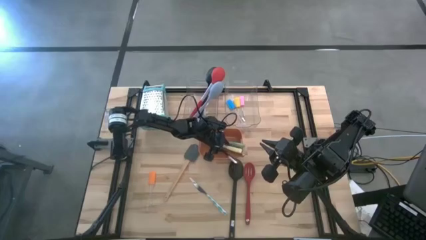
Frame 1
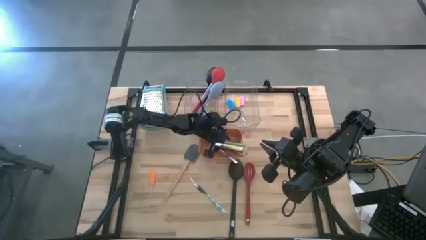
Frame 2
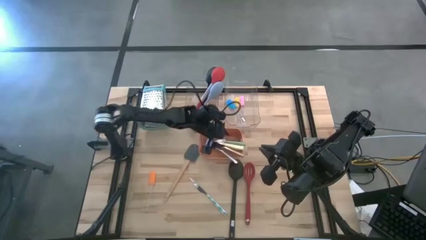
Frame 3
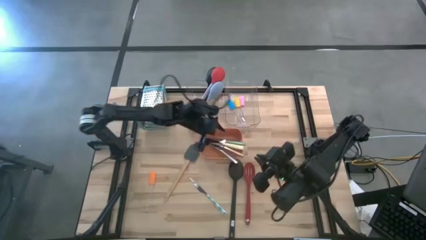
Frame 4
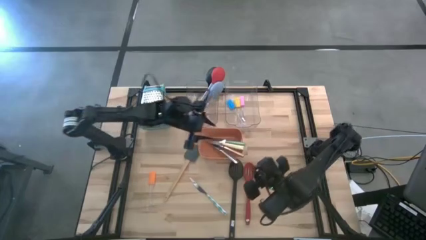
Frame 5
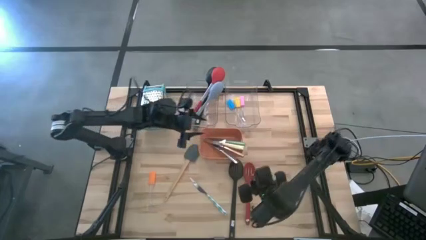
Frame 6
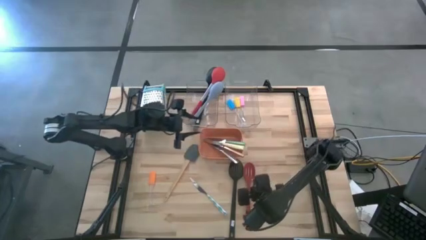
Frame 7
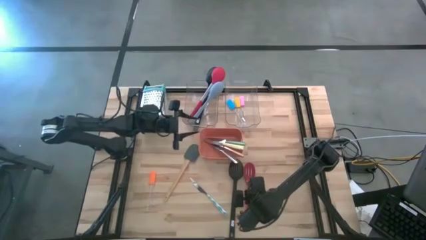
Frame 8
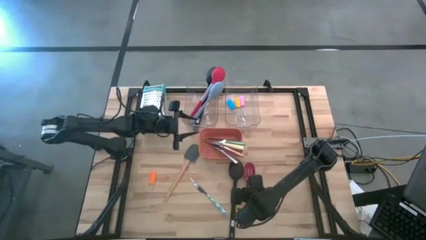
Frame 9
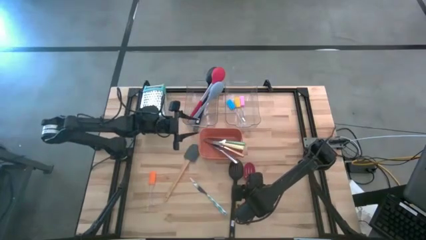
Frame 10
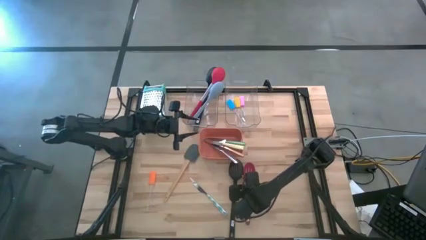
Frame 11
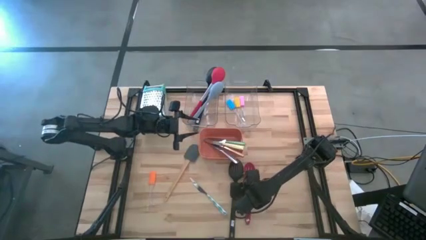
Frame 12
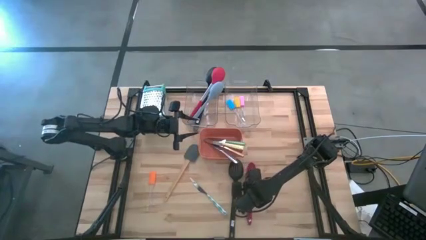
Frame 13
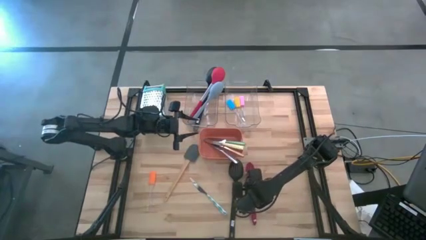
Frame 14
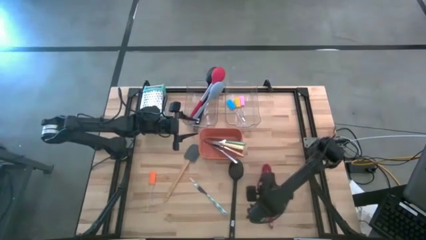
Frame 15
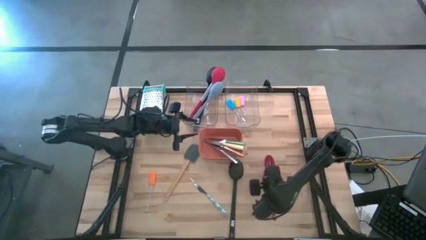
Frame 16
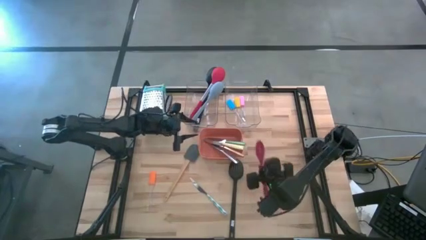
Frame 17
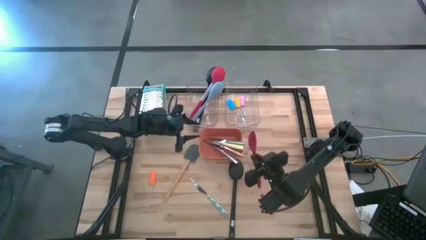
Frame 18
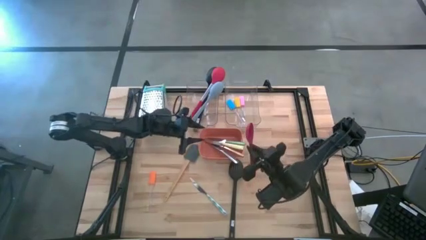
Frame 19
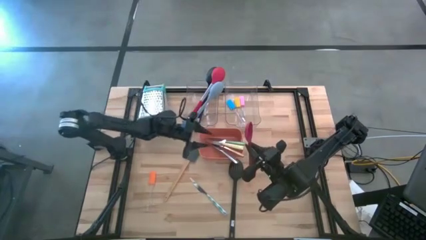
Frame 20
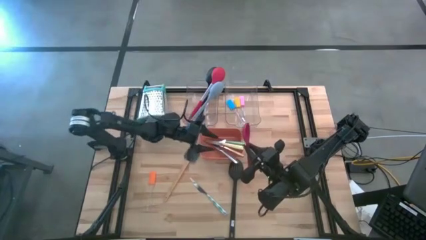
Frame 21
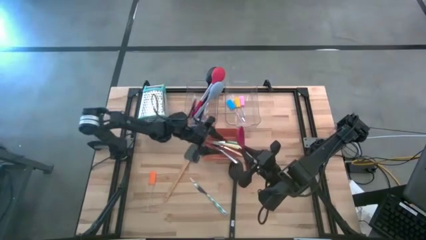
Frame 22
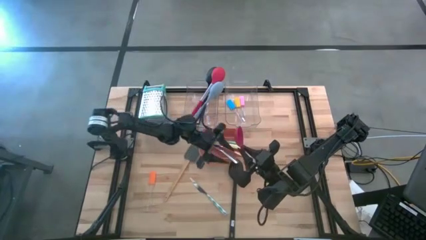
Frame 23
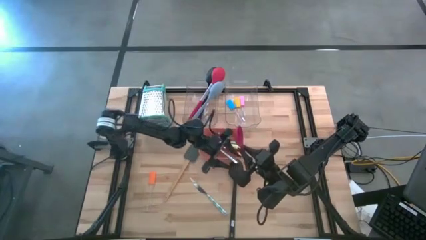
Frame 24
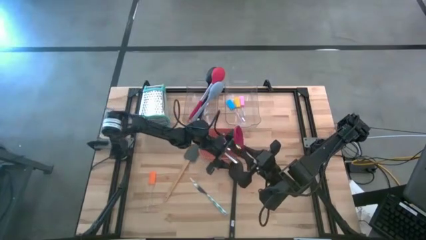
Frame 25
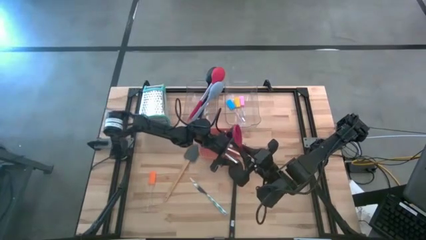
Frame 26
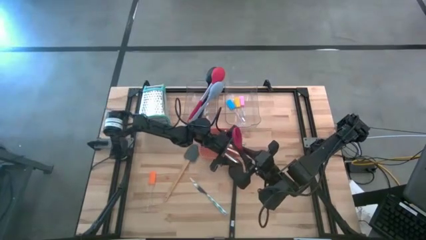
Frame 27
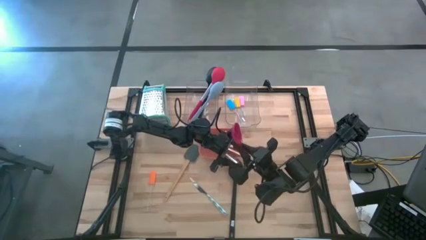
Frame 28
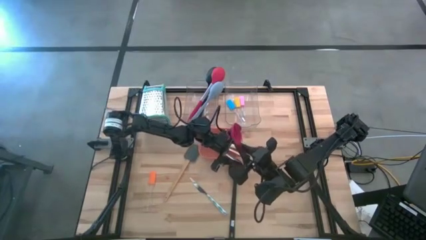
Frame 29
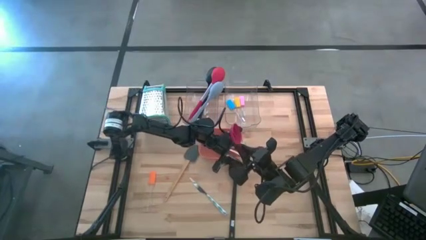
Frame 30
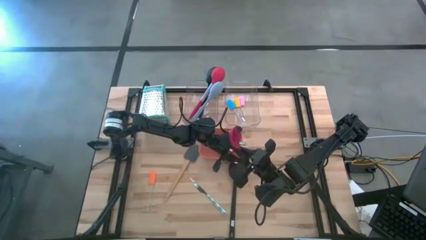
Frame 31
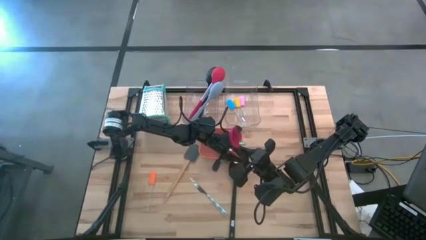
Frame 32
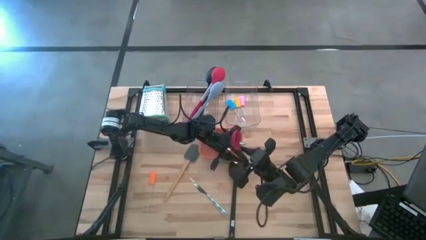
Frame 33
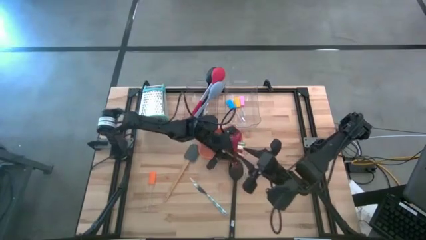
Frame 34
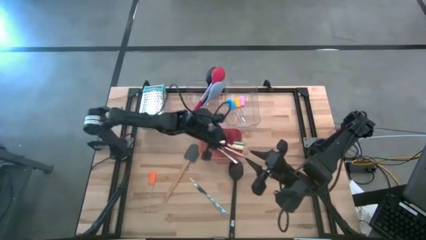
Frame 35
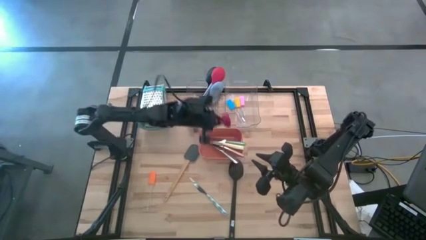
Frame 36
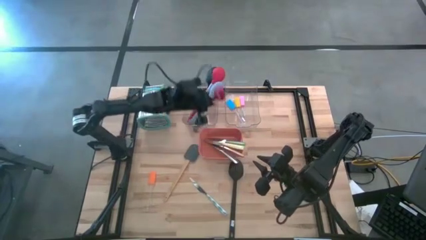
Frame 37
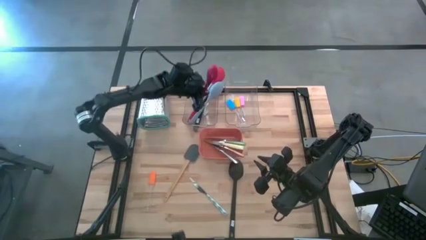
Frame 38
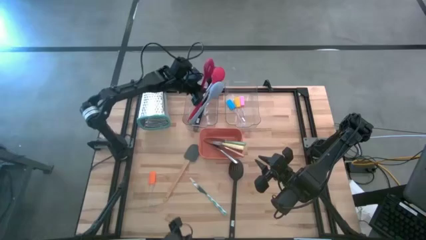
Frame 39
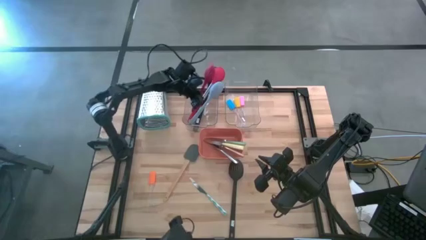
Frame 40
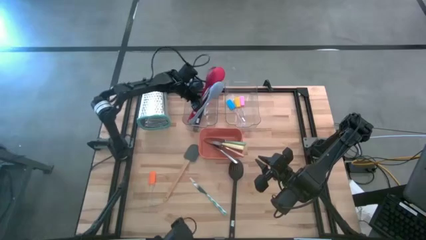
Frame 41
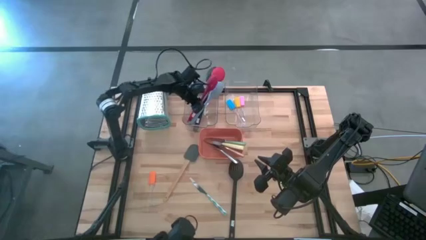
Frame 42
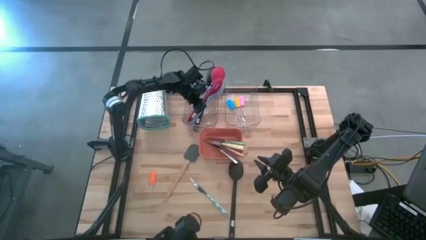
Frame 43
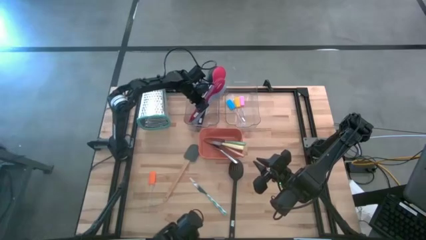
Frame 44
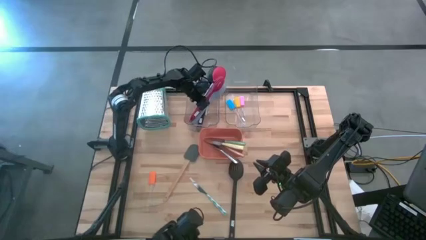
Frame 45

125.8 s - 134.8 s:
Task: Pick & Place Kitchen Items
Put the red serving spoon into the left transparent bin

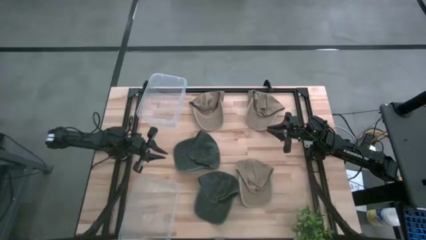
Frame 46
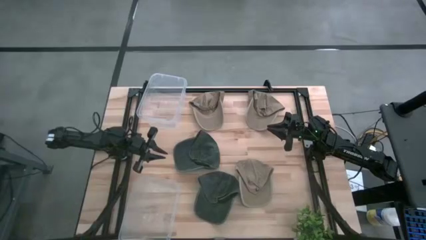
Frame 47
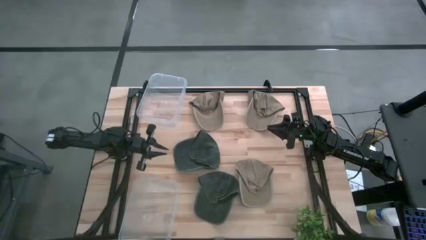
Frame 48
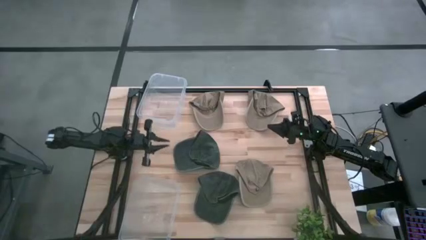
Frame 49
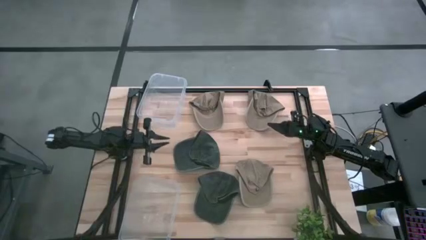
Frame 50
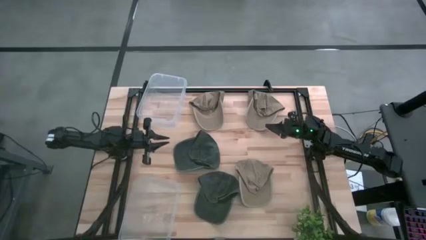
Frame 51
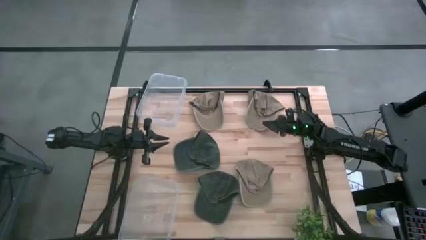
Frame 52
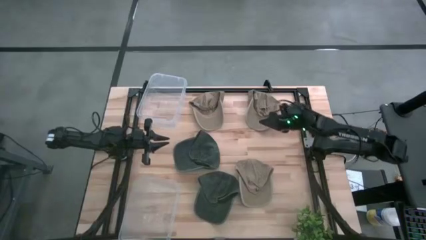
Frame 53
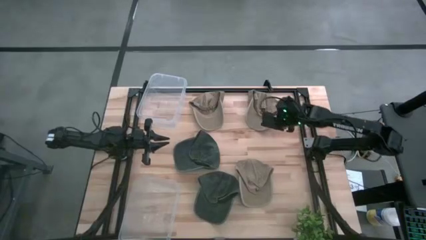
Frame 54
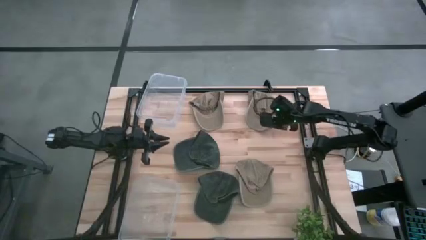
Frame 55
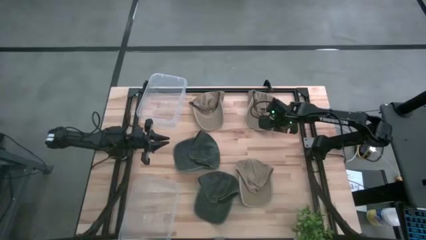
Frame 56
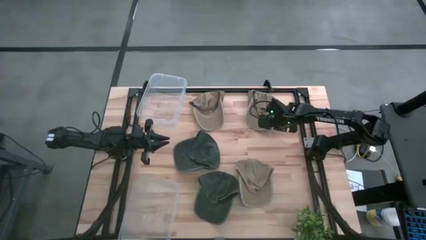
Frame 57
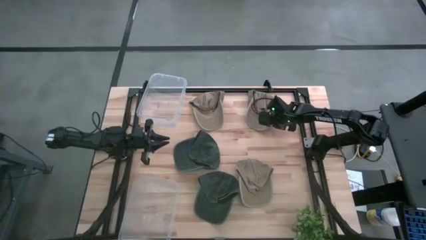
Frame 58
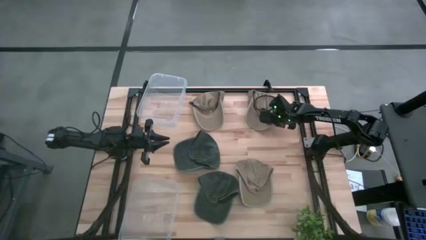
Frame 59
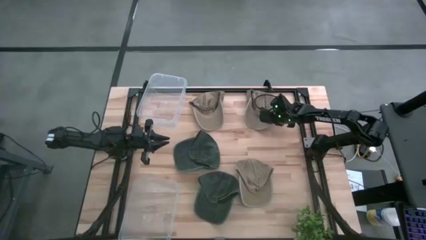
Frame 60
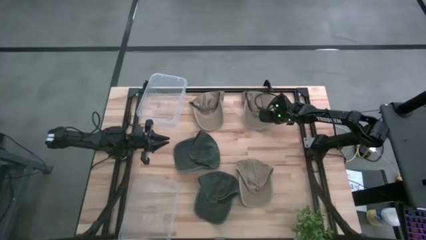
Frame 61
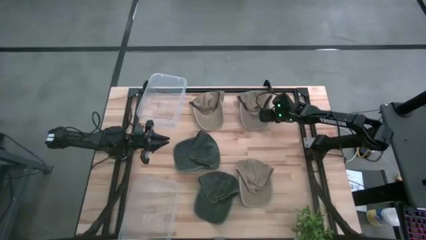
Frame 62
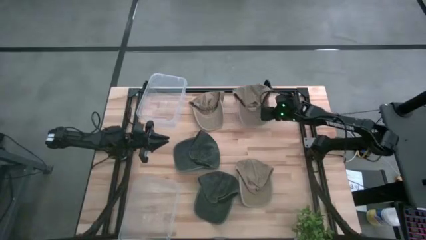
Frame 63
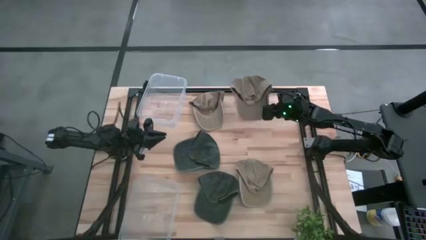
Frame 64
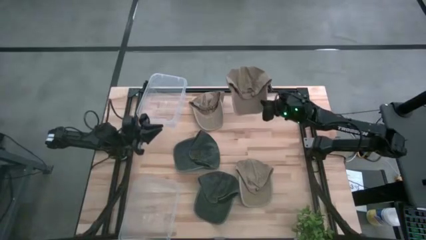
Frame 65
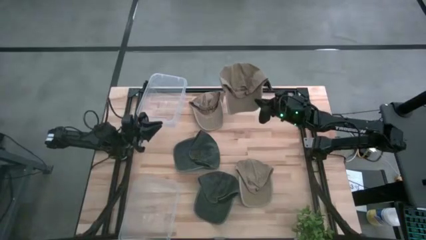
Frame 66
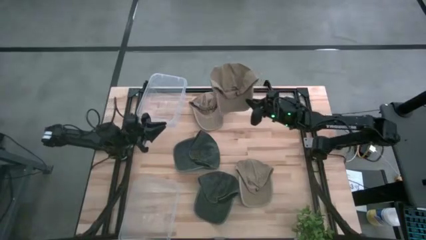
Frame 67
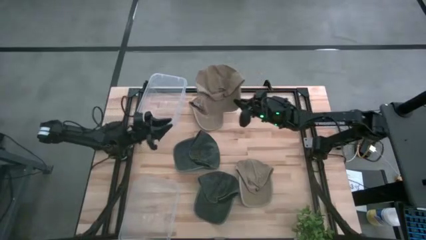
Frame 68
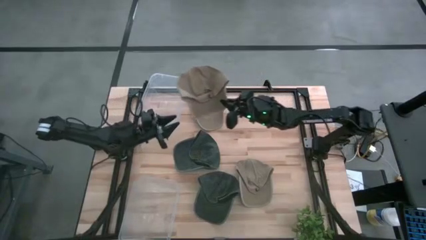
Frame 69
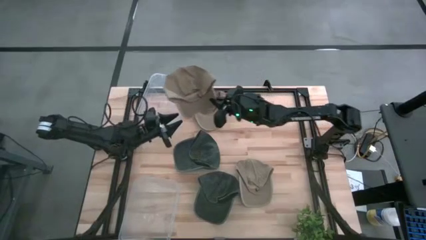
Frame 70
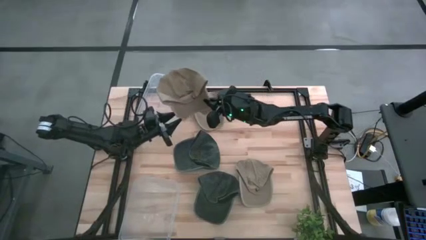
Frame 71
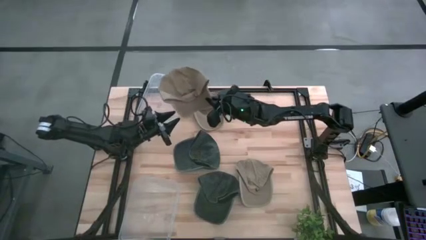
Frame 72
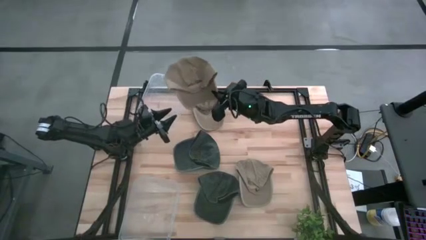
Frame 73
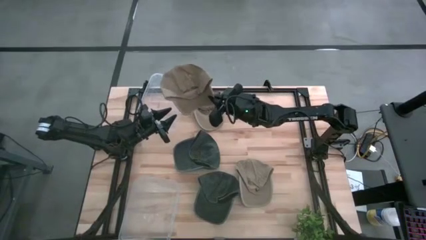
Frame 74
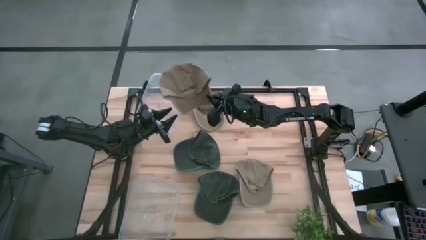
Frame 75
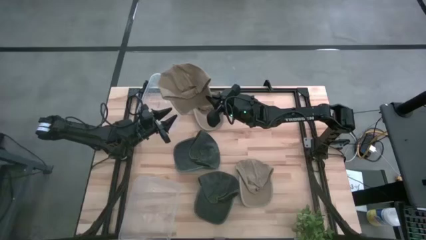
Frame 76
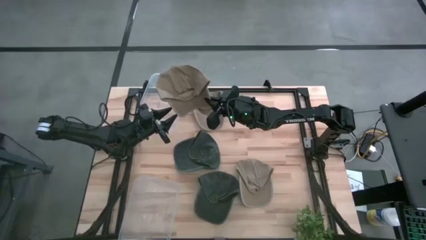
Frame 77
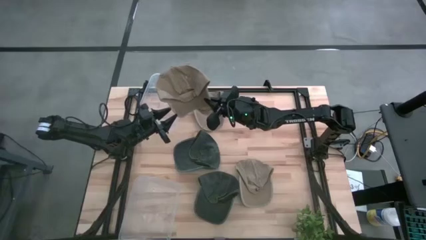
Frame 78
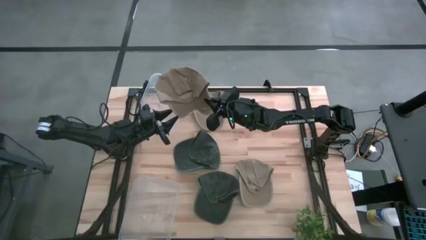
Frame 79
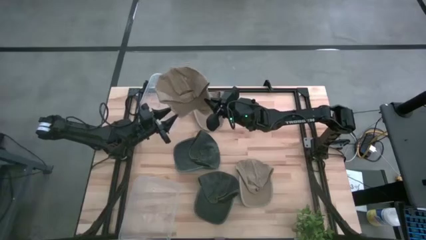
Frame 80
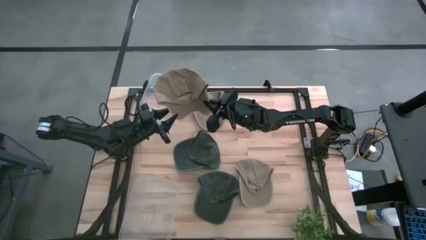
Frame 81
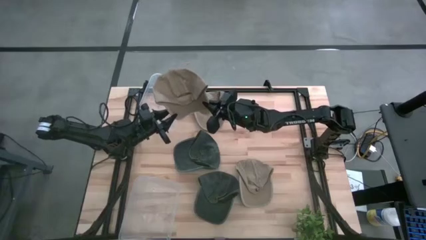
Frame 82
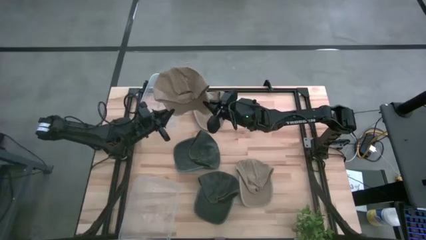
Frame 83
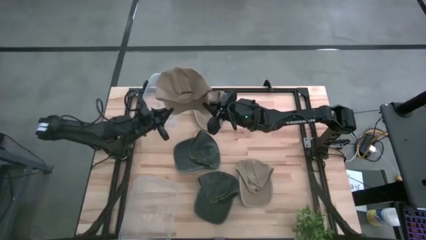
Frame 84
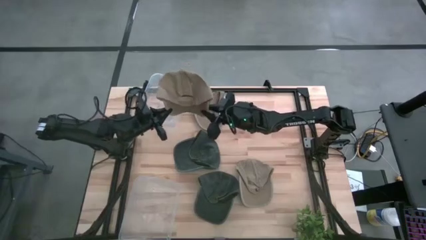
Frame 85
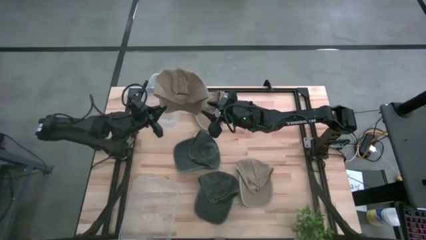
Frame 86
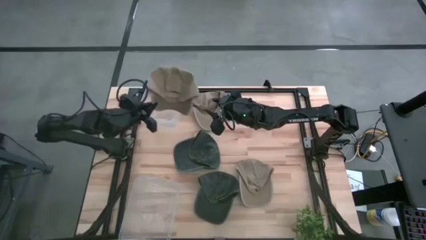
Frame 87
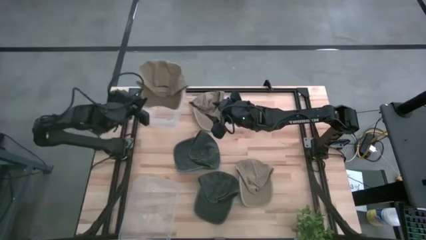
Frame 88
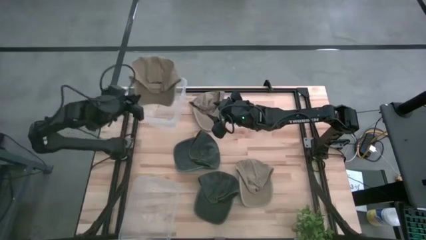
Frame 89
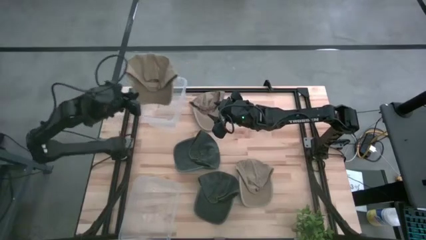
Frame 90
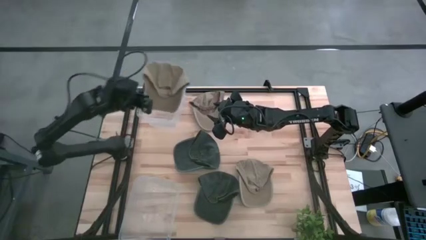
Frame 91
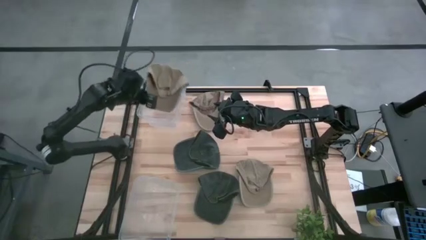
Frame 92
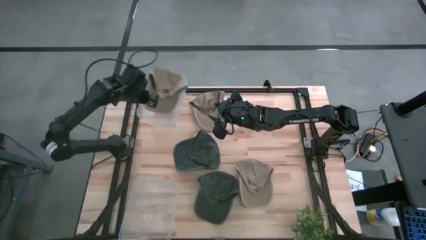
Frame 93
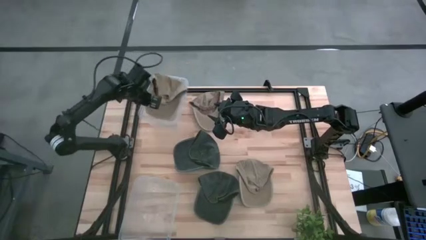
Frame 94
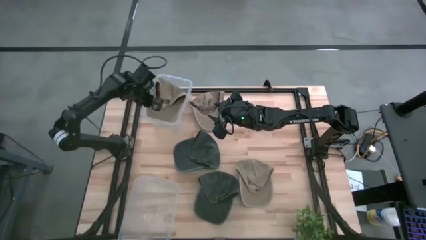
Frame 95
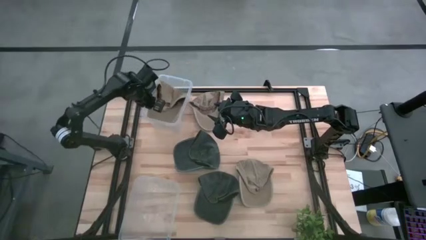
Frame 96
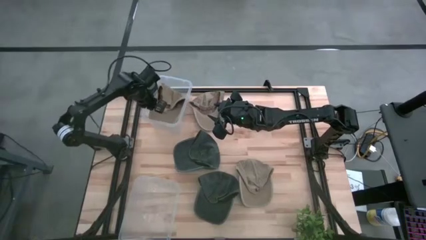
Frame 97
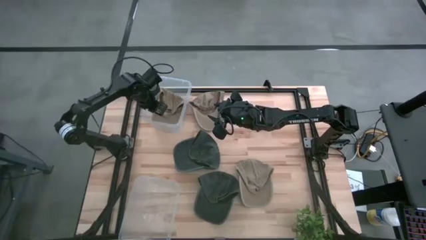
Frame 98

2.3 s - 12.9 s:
Task: Pick and place caps into container
Put the top right brown cap into the top transparent container
